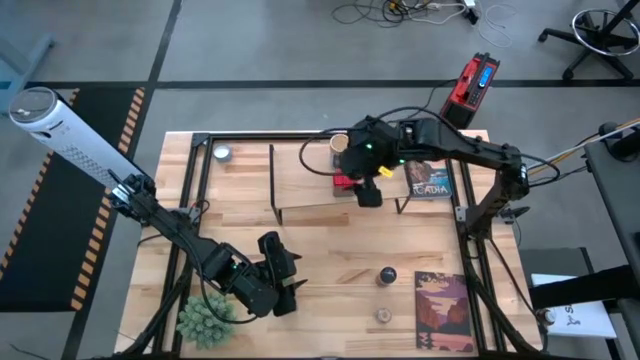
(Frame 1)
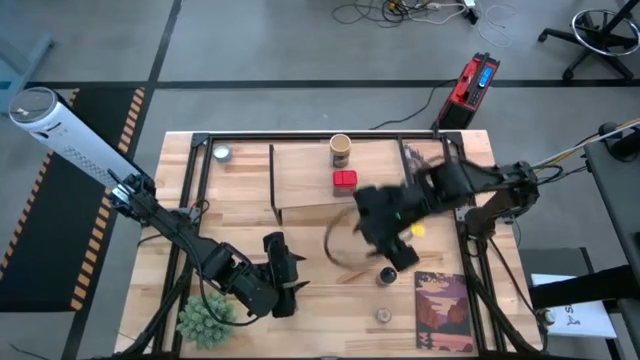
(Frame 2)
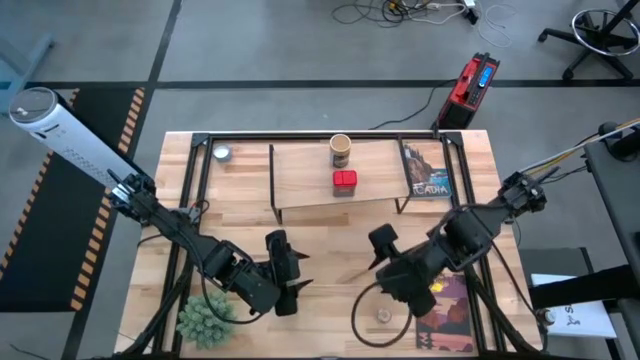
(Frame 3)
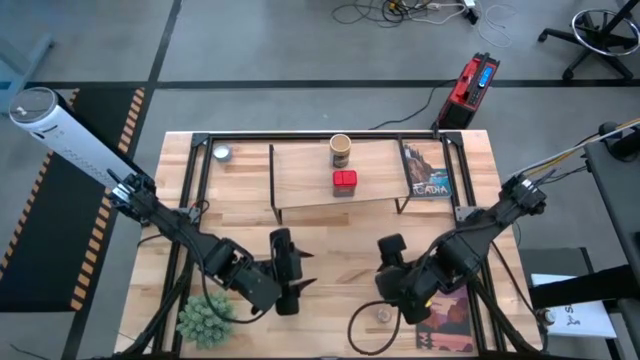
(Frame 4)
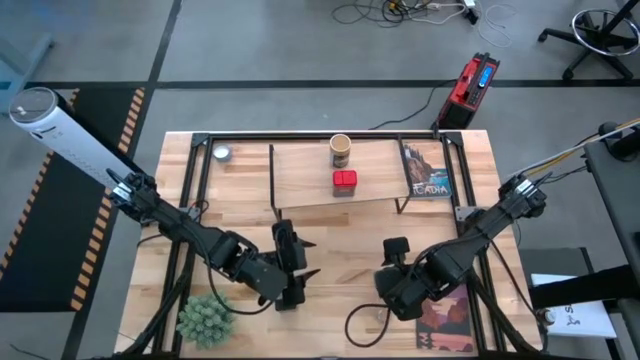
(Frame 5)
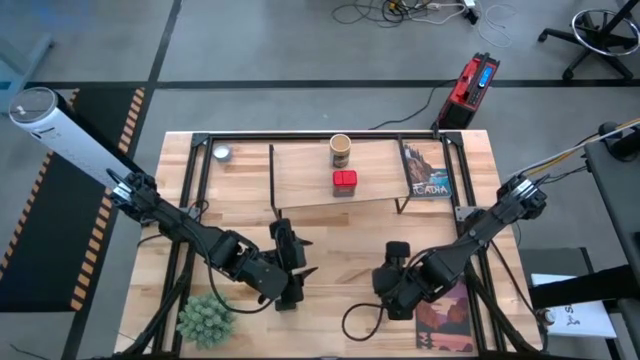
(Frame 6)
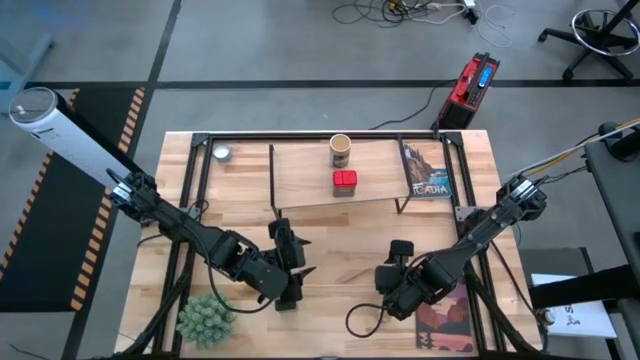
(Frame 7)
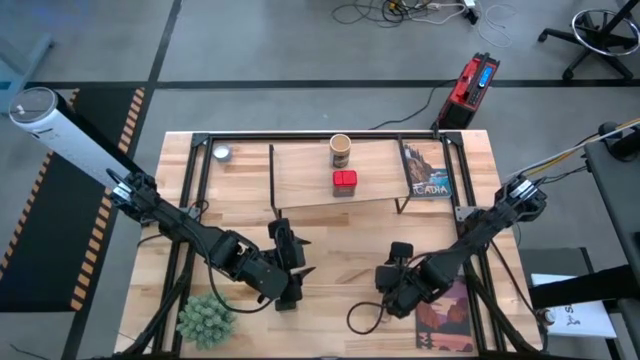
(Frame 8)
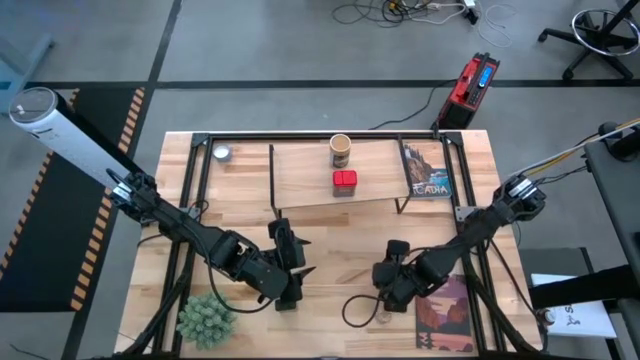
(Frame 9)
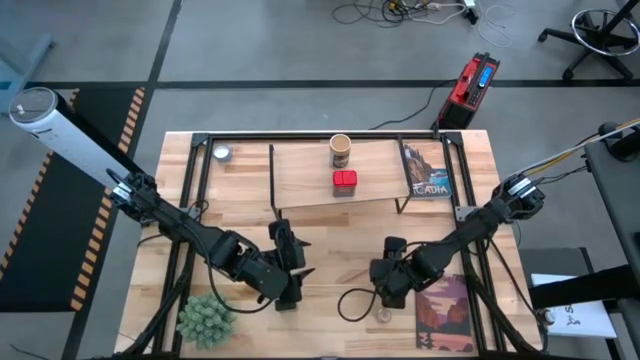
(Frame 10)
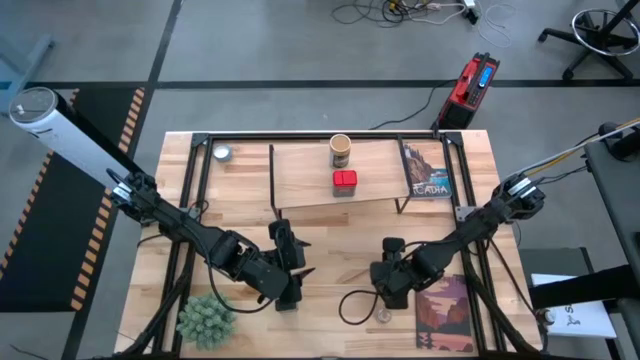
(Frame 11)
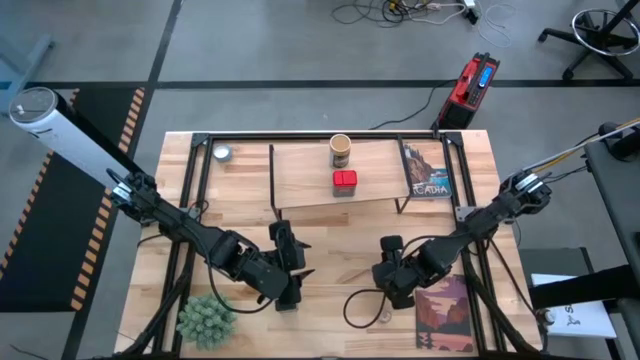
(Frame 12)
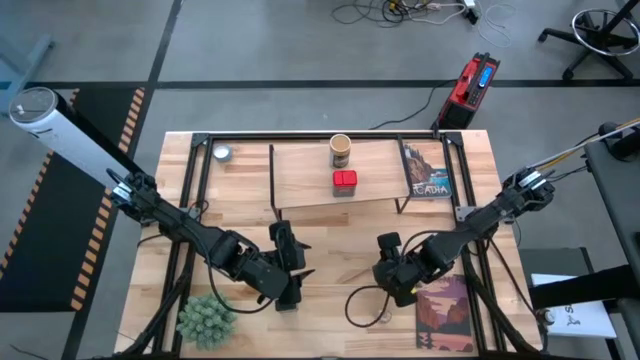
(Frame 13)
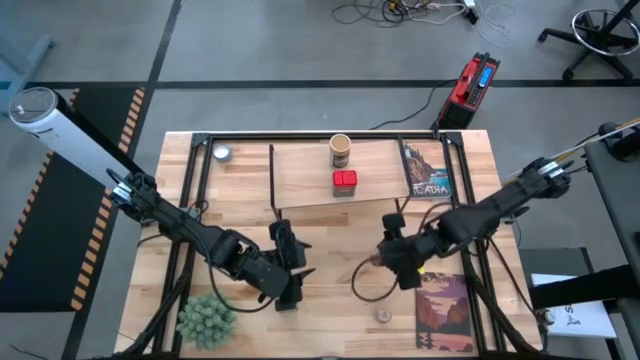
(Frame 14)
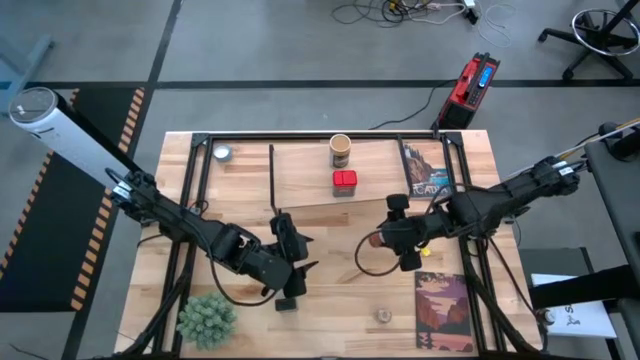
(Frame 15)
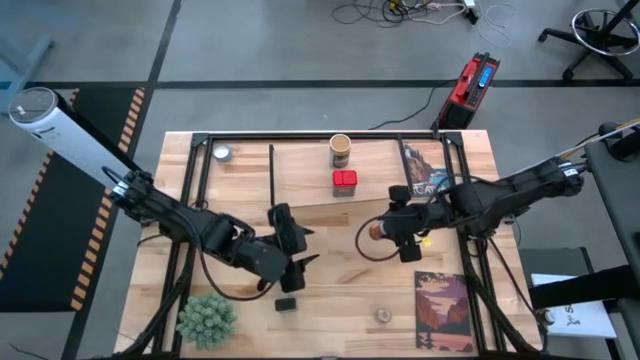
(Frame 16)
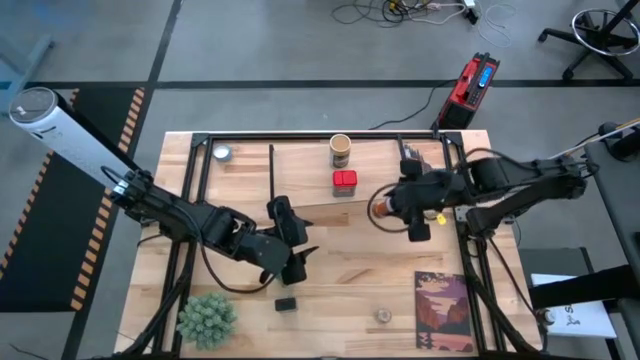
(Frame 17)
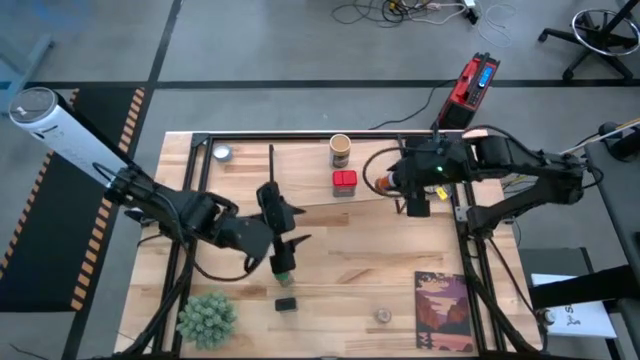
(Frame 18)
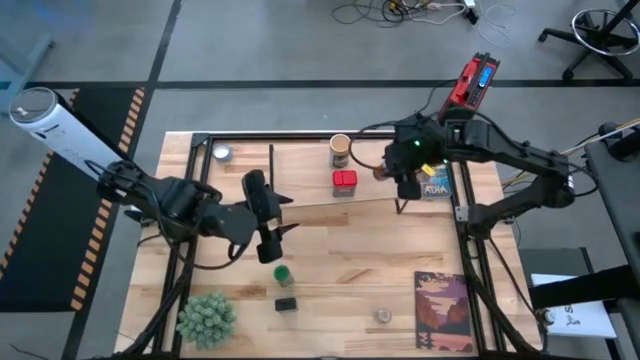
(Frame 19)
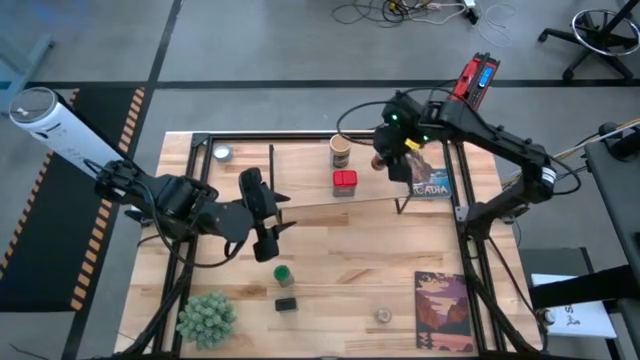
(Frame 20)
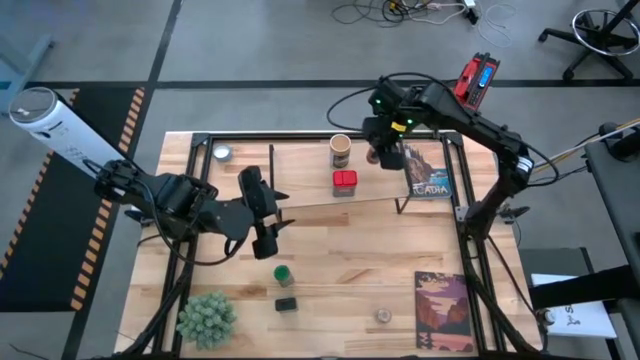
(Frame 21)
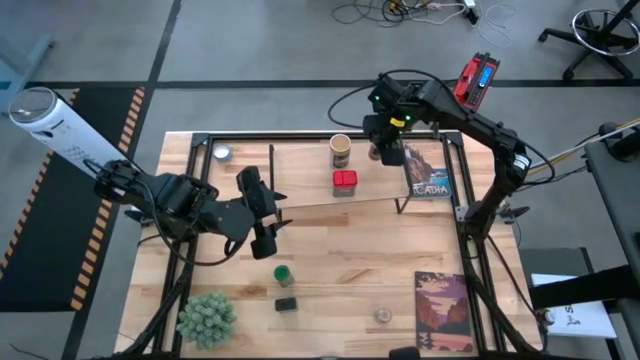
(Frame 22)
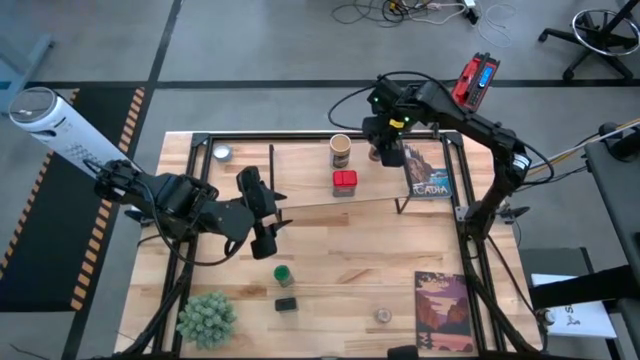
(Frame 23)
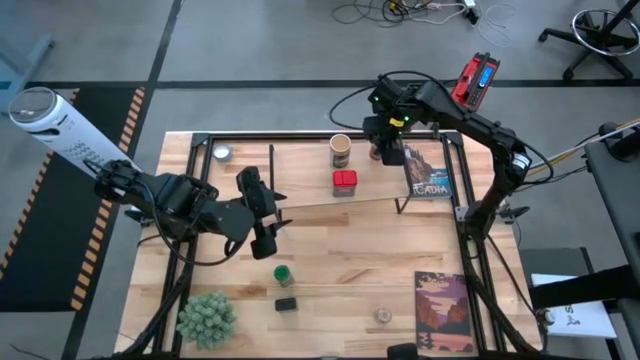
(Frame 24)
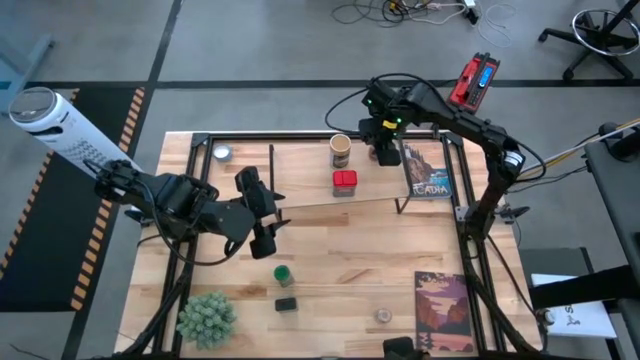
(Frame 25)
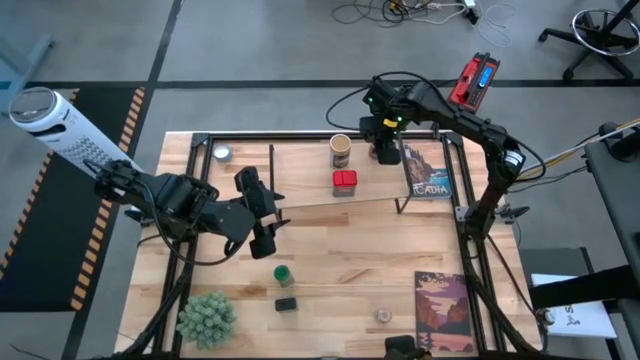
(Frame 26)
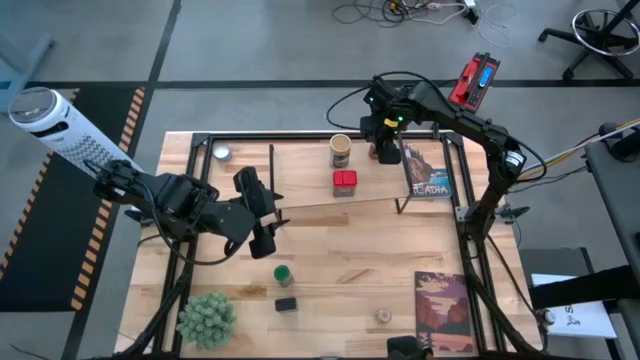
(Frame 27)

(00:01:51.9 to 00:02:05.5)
Task: Shelf spices
Put the orange seasoning bottle on the shelf

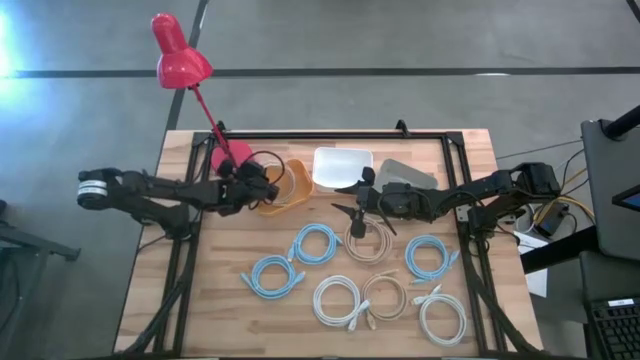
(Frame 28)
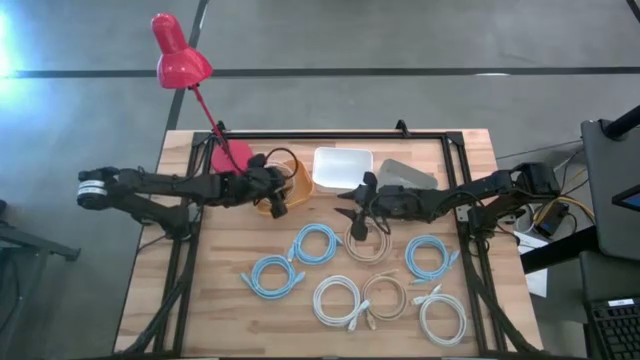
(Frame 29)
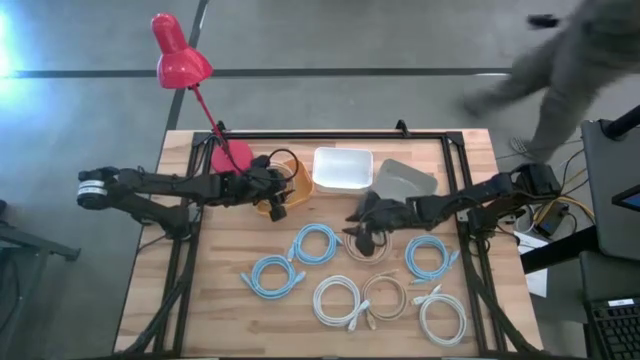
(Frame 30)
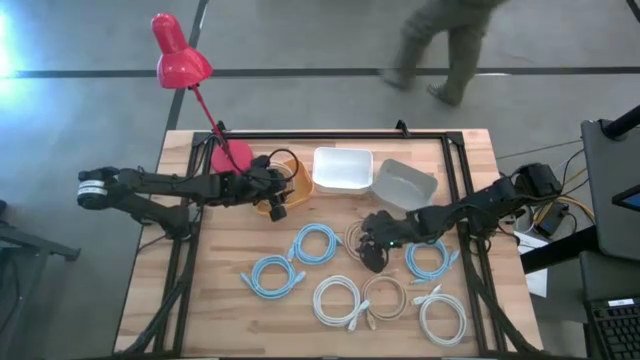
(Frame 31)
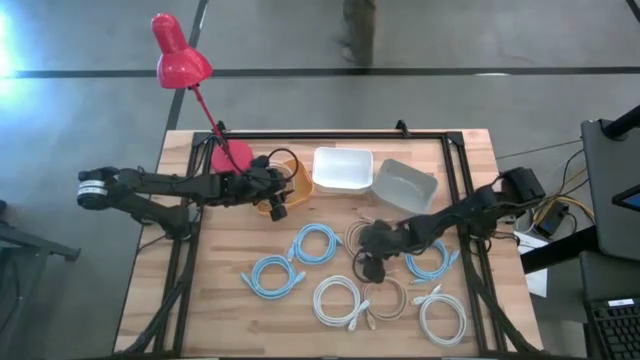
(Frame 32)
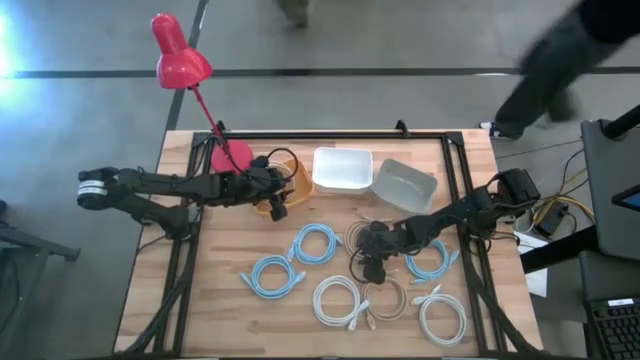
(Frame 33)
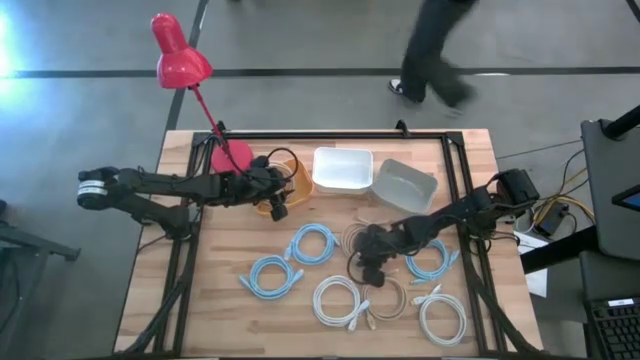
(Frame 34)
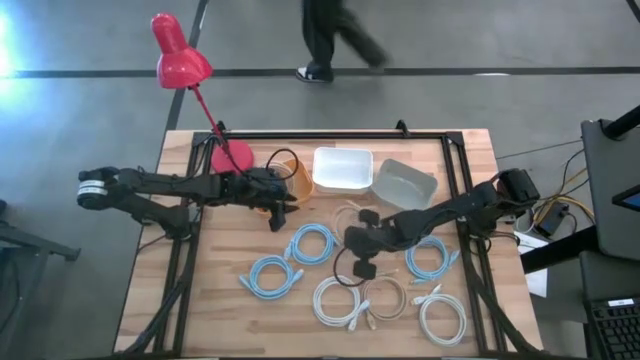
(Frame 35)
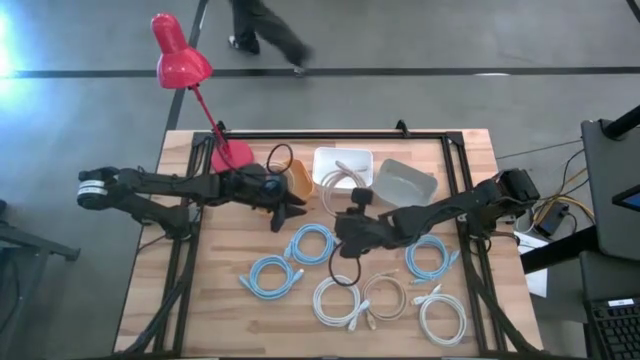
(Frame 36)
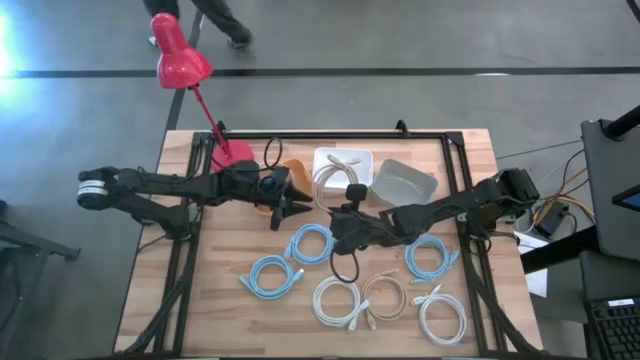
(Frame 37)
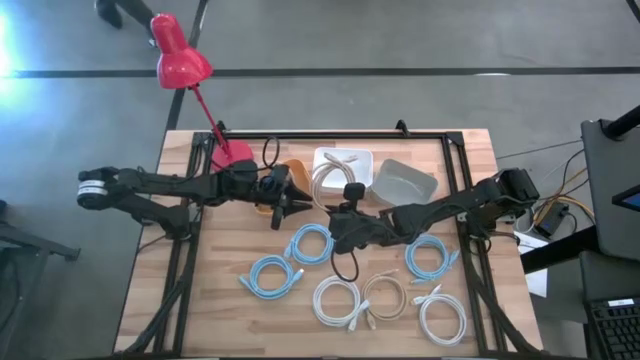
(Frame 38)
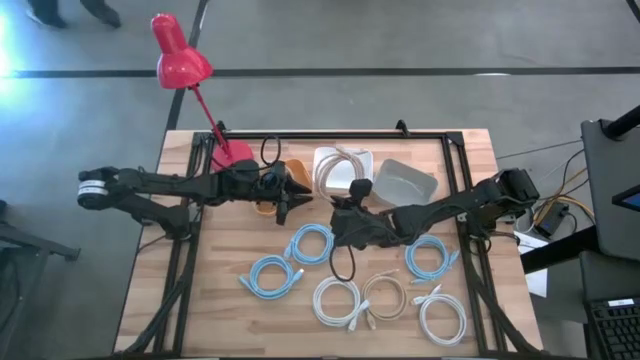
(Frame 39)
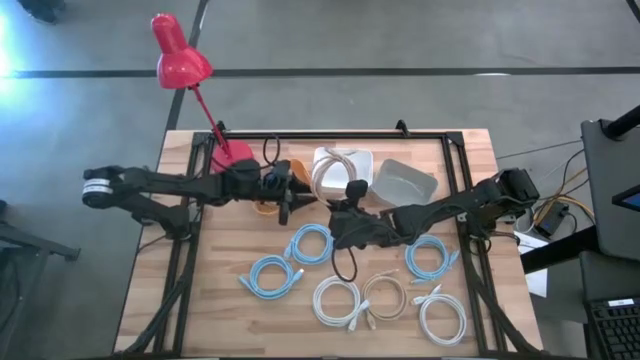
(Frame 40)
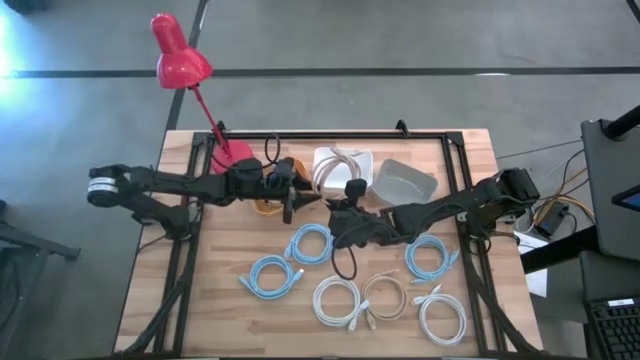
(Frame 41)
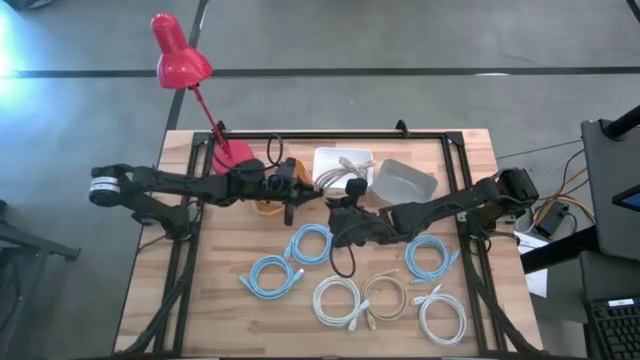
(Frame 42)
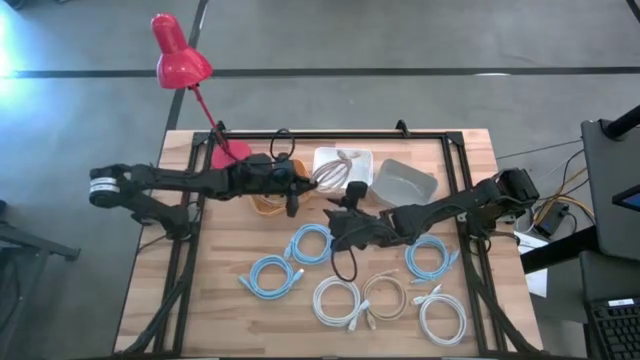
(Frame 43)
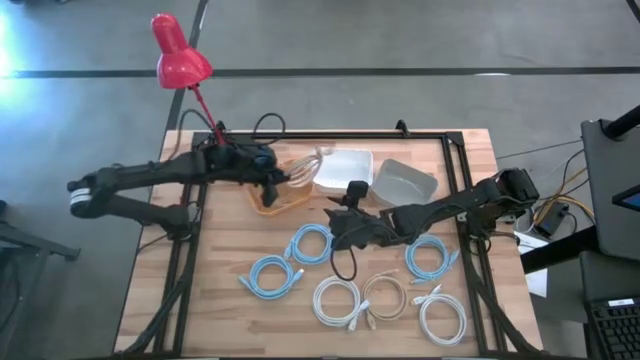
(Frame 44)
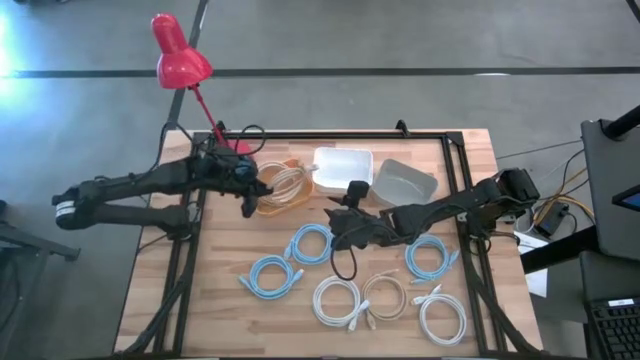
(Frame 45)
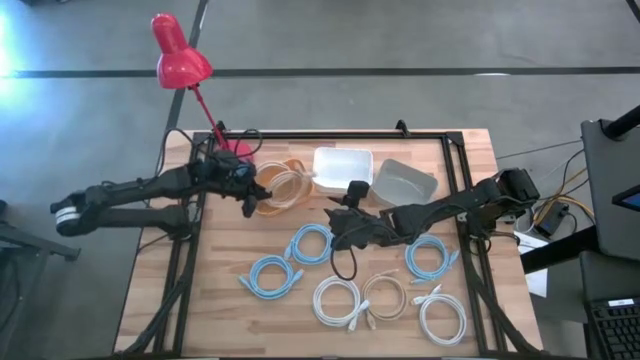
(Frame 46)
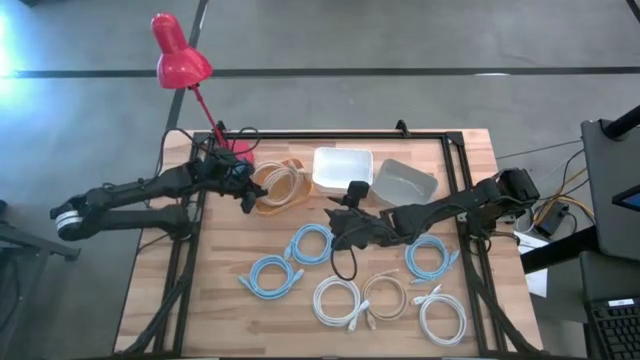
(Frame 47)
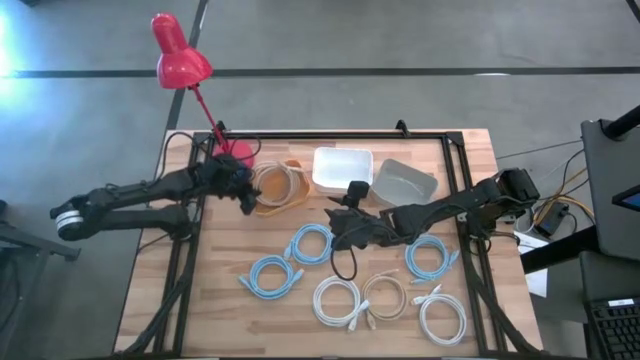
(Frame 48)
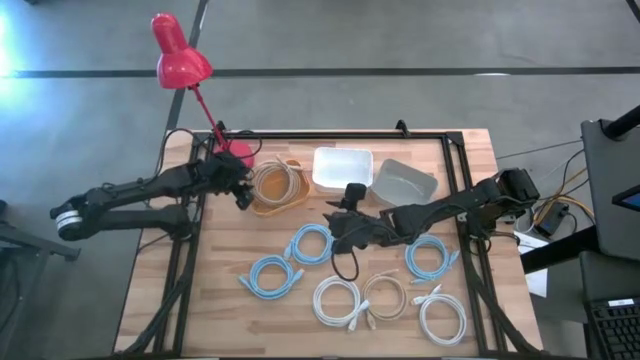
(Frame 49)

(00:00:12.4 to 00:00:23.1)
Task: Pick & Place USB Port
Put the top brown usb cable into the yellow bin
